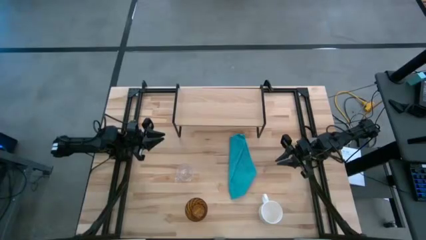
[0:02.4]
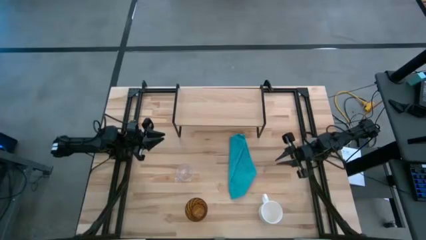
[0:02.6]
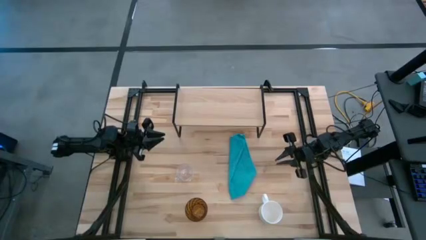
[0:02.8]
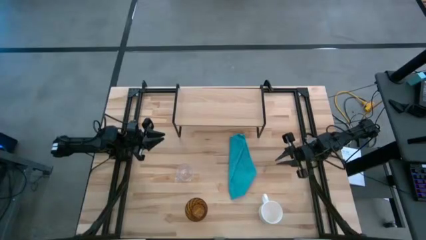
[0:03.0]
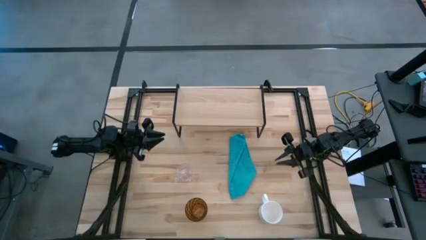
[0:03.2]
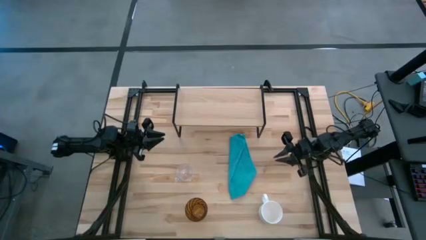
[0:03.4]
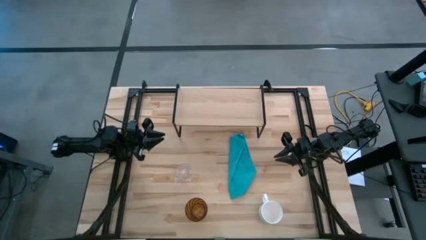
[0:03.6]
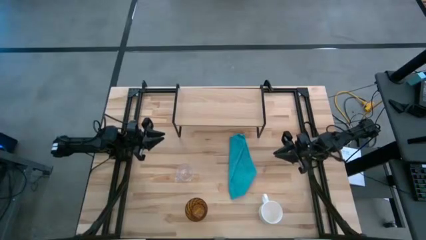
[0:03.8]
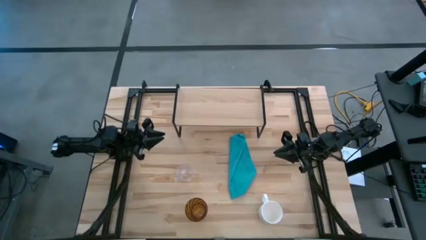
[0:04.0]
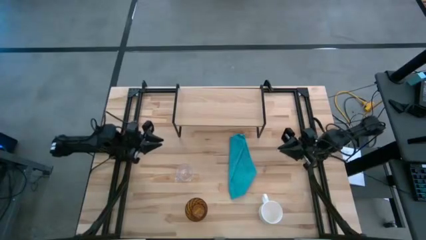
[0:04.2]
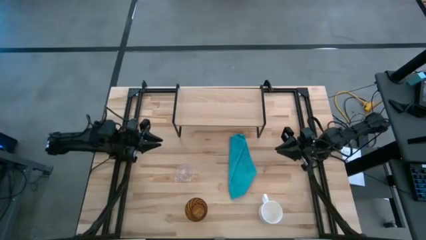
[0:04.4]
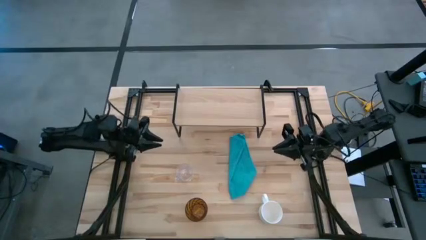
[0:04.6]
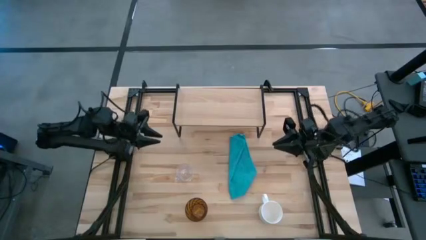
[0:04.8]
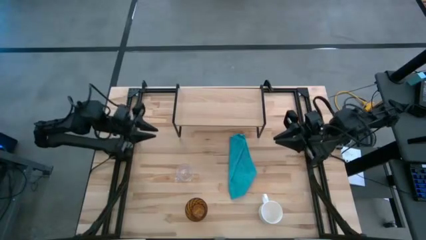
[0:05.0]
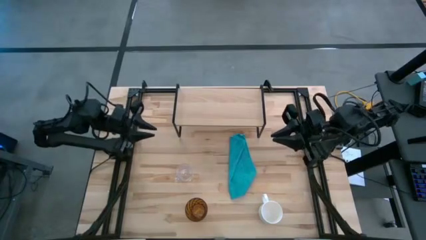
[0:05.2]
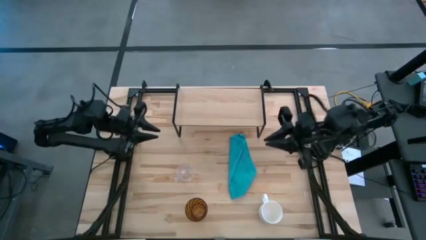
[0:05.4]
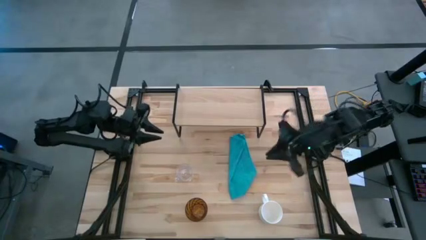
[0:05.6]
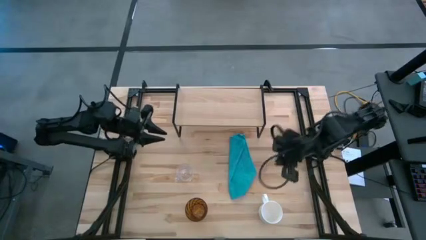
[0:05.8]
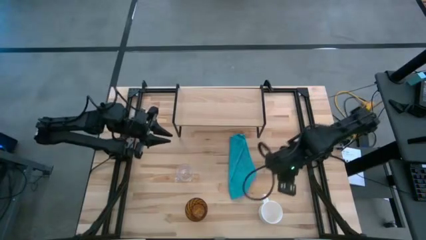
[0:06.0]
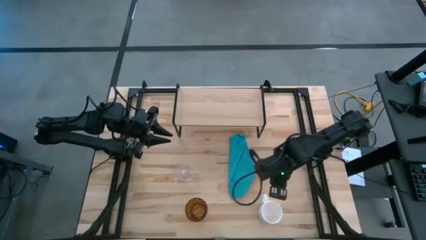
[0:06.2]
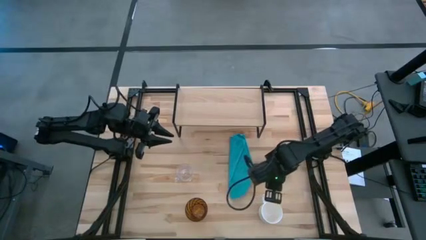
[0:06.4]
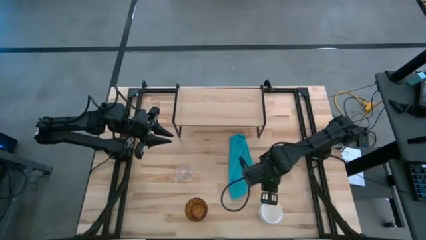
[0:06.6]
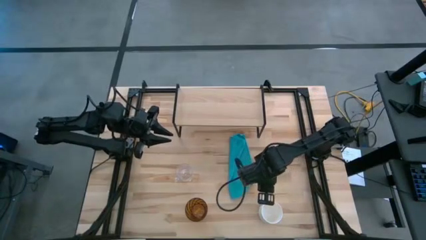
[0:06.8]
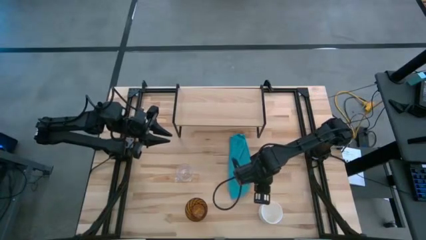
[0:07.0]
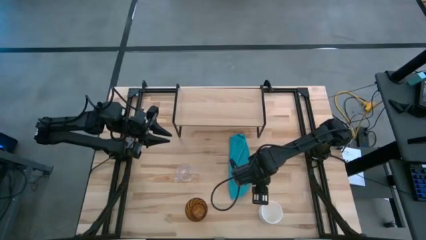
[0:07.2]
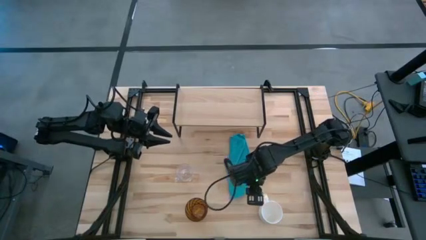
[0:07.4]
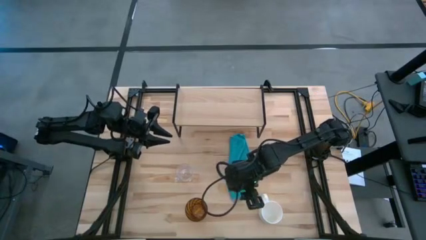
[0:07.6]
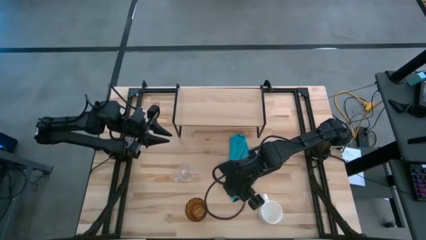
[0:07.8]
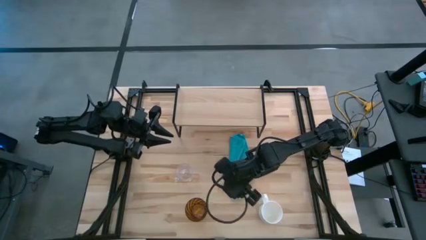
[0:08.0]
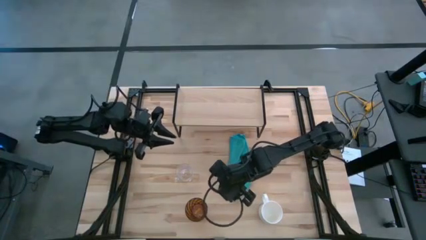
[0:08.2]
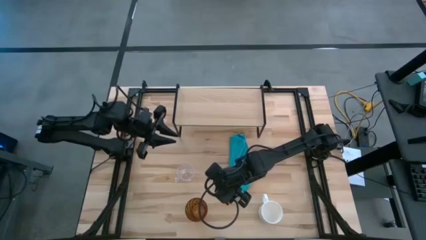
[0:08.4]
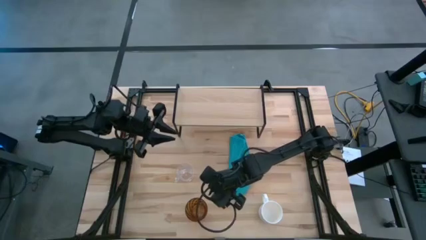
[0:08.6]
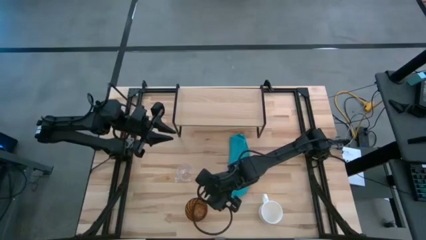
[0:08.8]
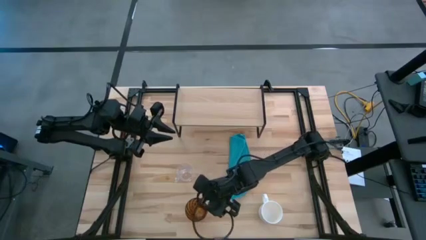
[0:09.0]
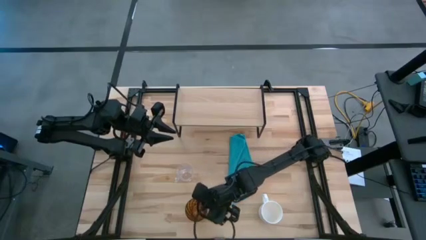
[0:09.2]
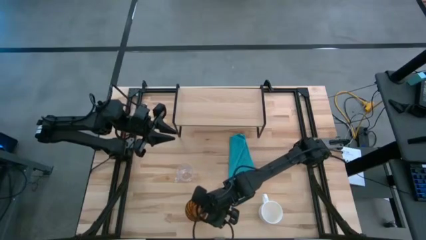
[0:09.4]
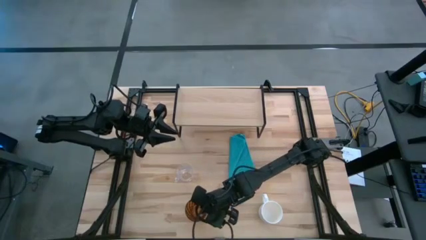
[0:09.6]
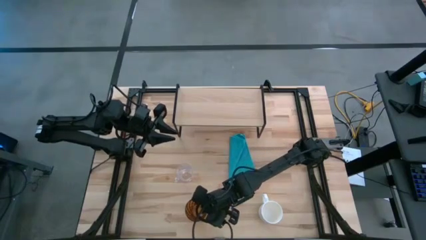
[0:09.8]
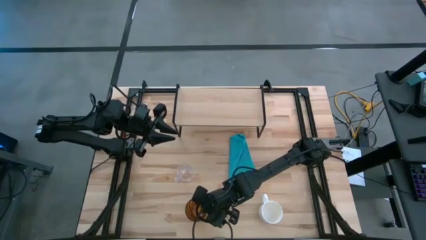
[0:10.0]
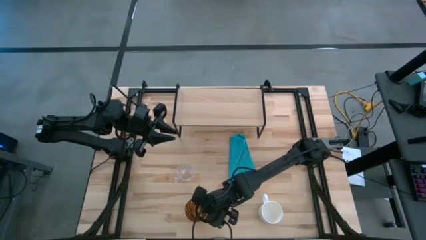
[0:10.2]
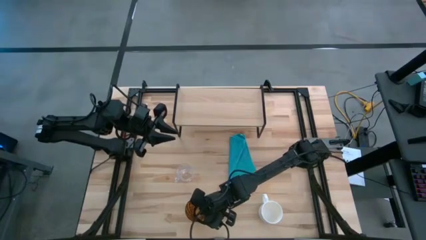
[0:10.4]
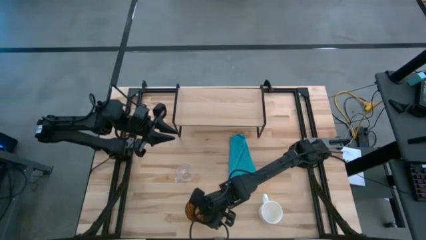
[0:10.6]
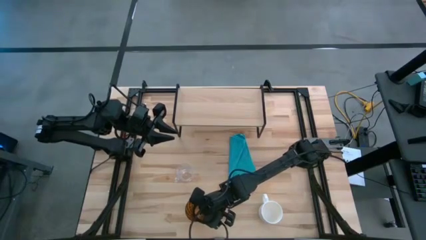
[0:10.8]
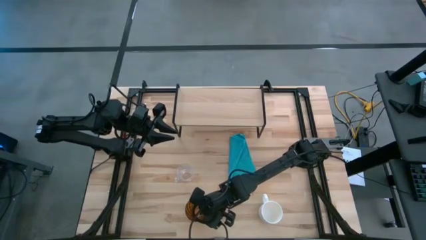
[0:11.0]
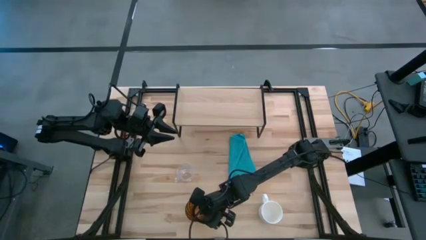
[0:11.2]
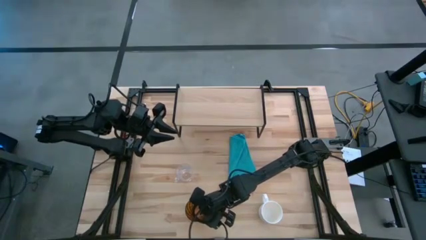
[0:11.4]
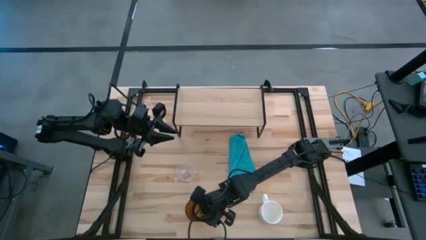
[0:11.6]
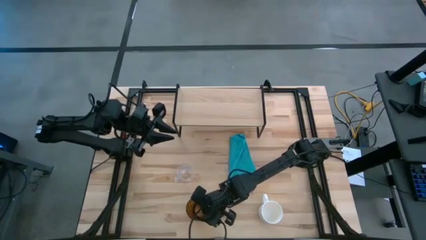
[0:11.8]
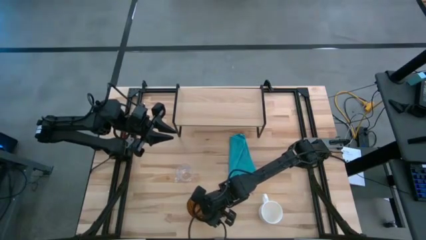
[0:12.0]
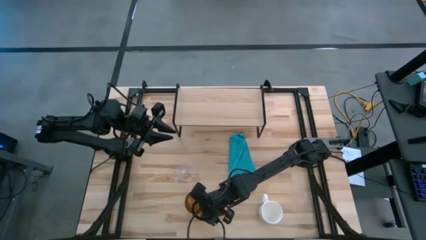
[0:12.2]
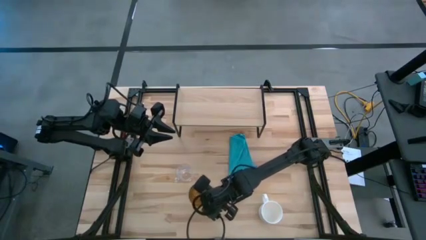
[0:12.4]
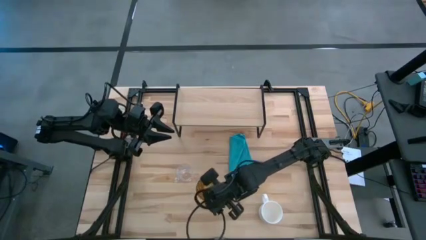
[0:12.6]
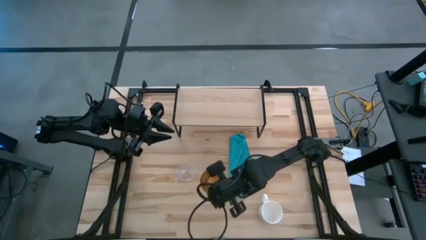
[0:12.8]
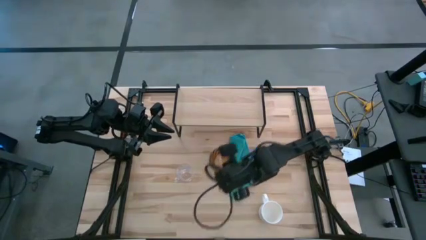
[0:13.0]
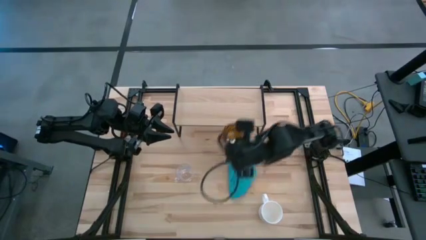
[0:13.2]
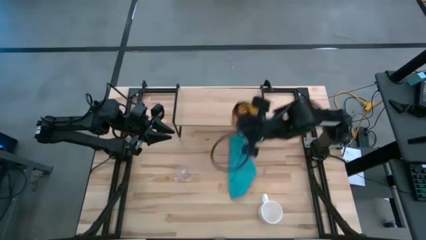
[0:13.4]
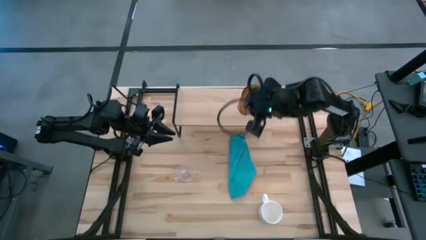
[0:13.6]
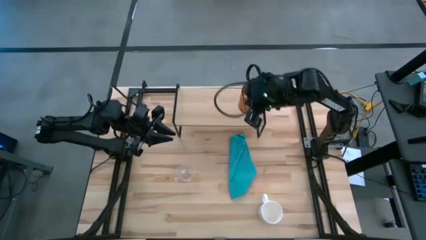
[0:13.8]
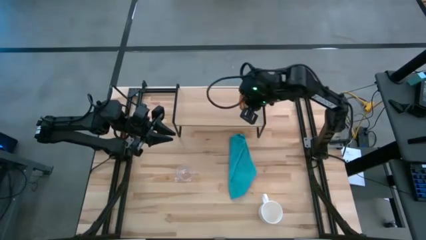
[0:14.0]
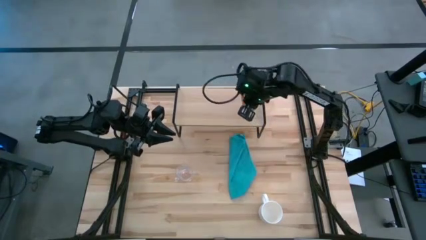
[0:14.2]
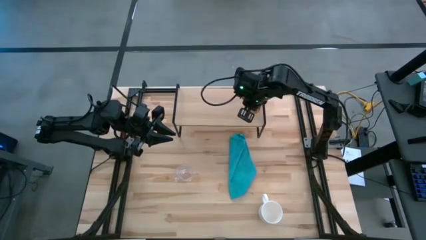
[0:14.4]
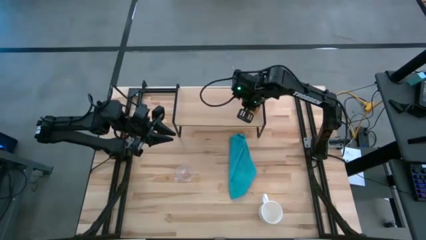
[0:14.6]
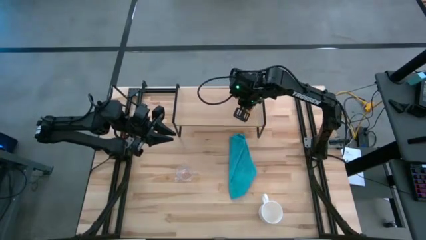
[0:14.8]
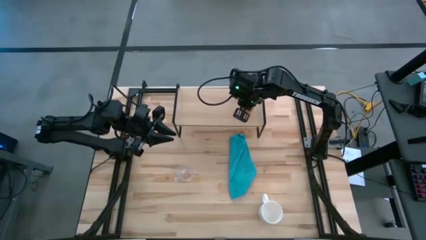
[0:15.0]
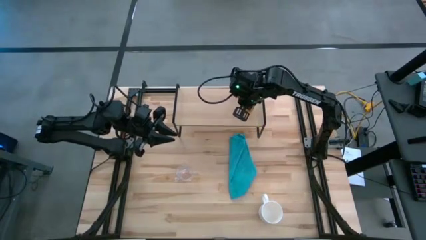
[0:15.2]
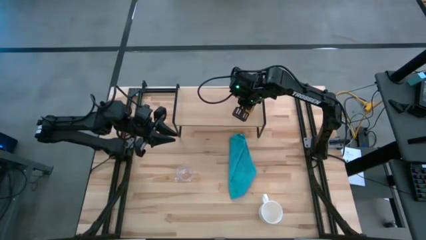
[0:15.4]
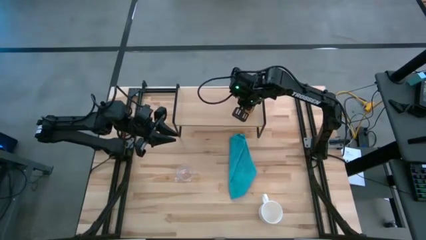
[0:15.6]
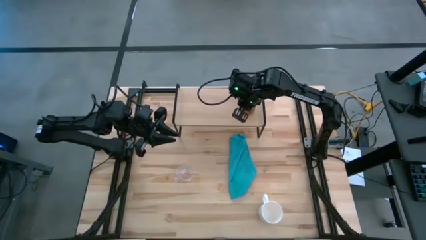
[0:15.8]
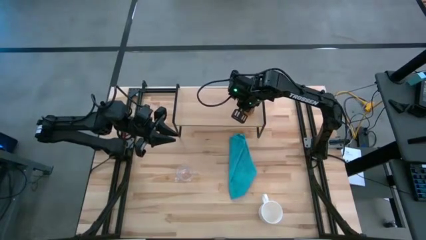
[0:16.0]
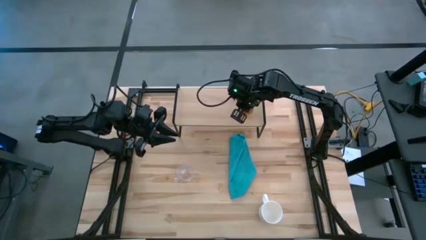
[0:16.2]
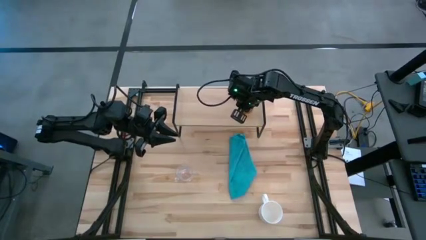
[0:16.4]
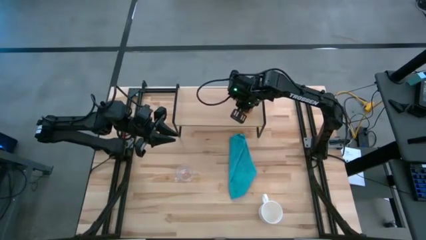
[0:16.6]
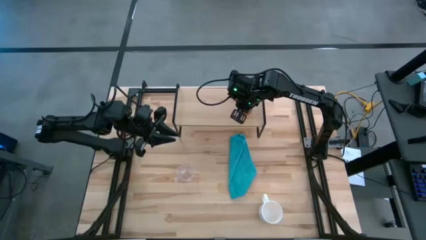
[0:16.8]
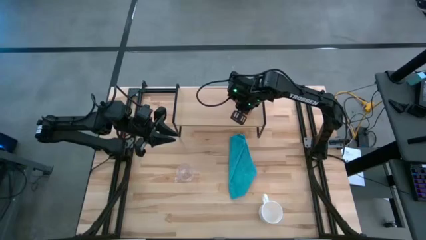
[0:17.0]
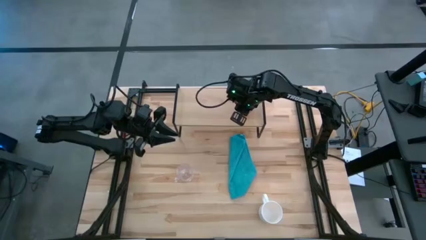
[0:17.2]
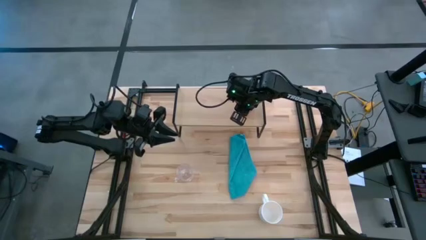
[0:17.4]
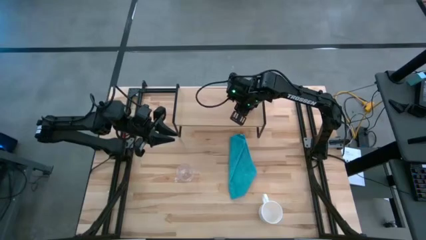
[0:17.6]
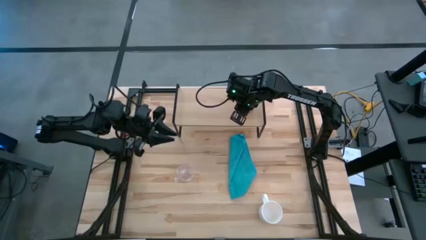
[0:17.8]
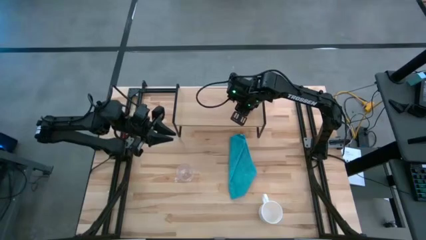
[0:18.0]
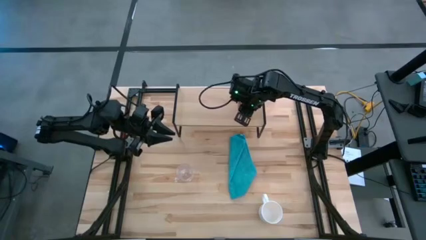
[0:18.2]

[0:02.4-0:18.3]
Task: Stack small to large cups/mugs on shelf
Put the brown glass on the shelf
